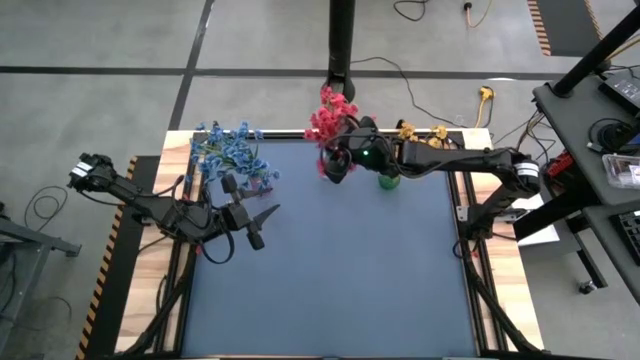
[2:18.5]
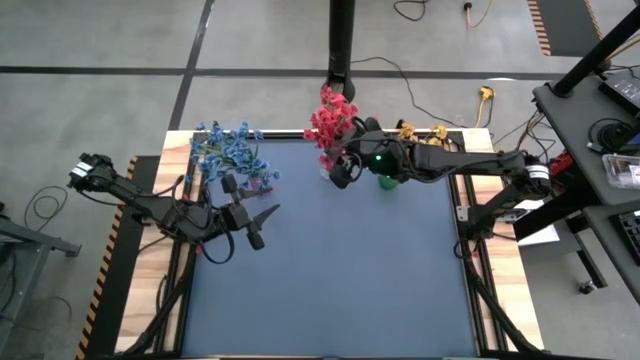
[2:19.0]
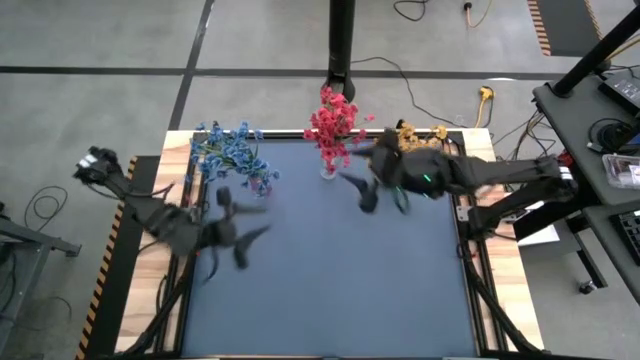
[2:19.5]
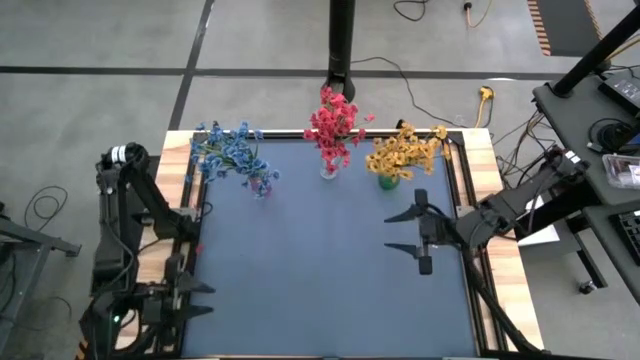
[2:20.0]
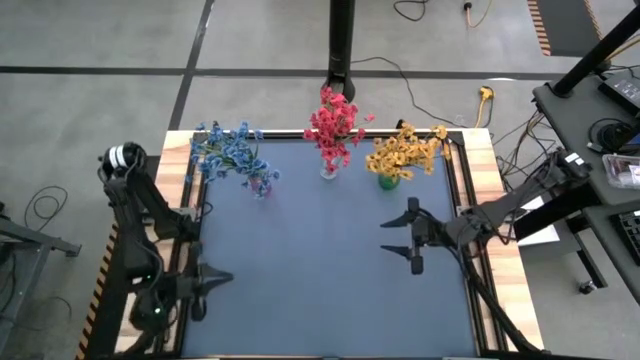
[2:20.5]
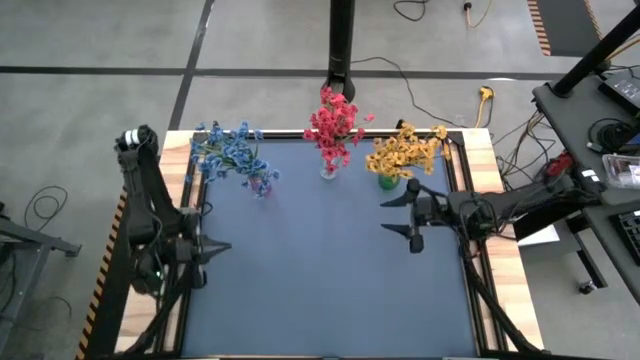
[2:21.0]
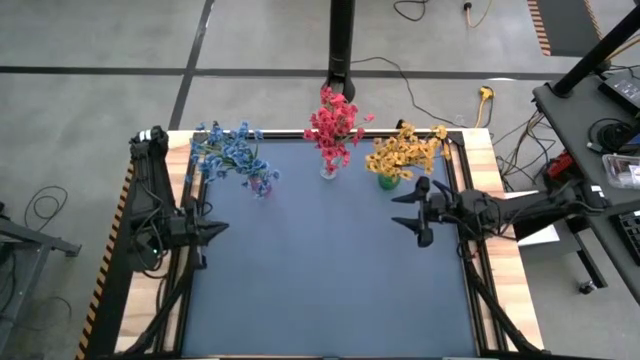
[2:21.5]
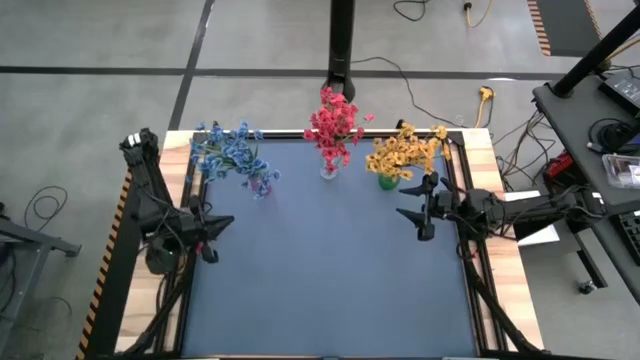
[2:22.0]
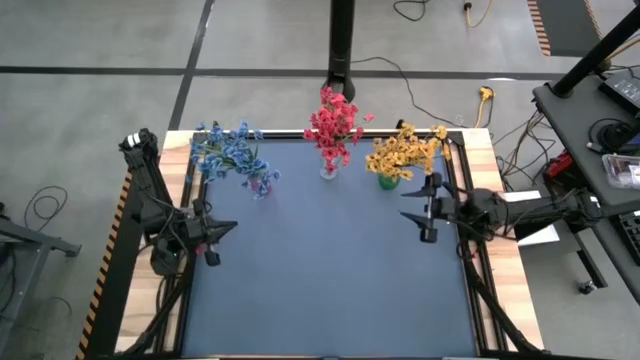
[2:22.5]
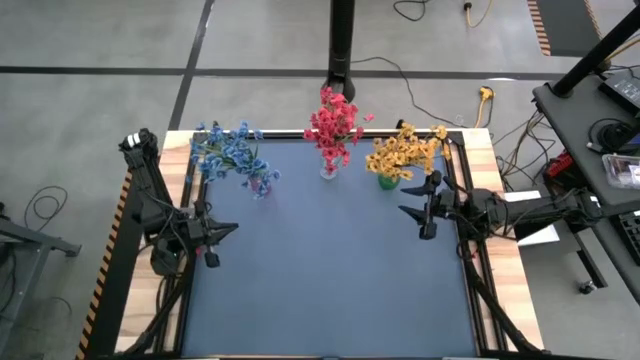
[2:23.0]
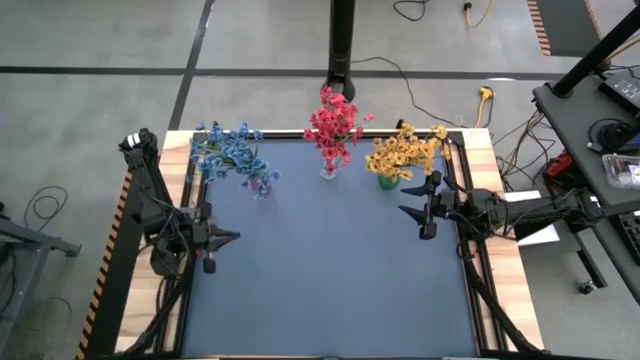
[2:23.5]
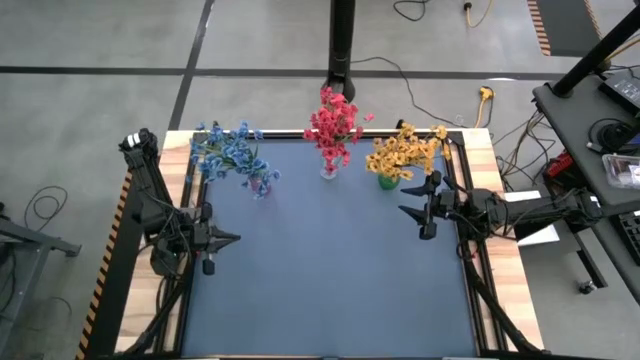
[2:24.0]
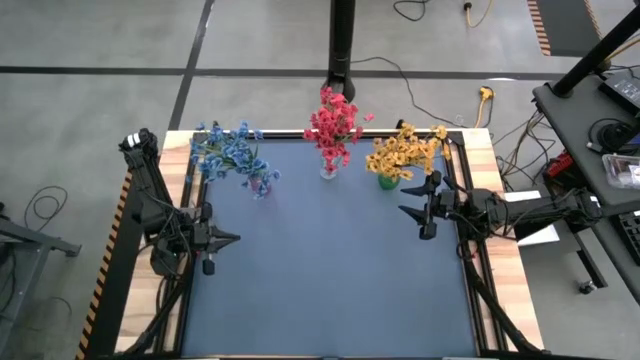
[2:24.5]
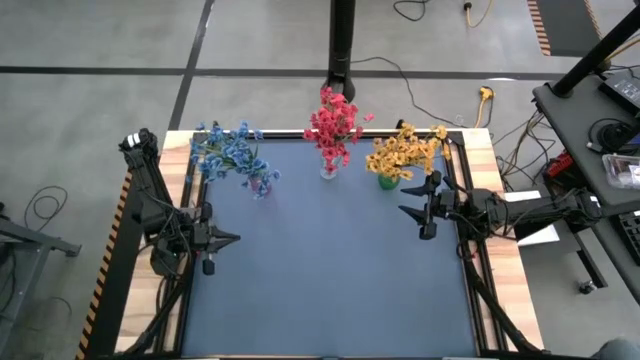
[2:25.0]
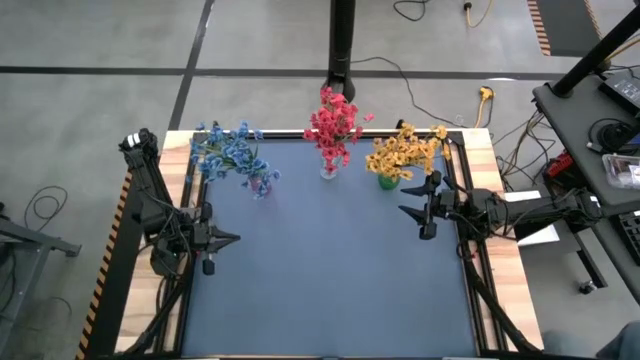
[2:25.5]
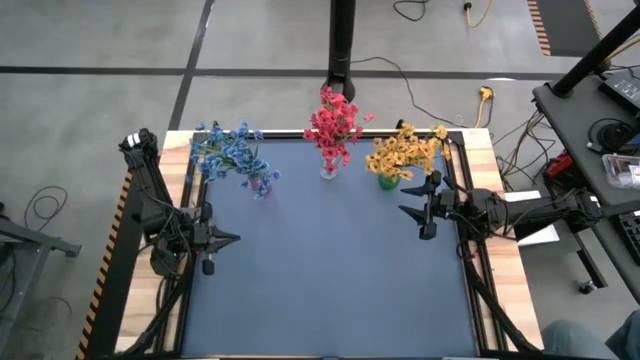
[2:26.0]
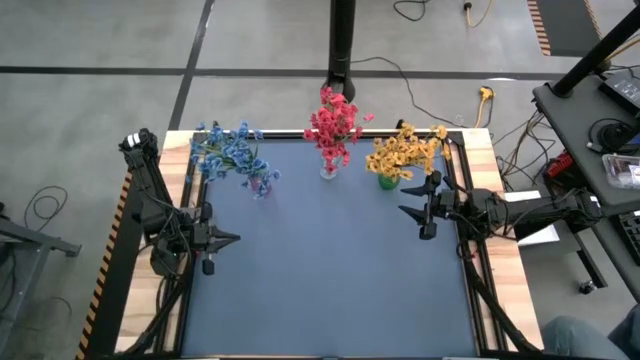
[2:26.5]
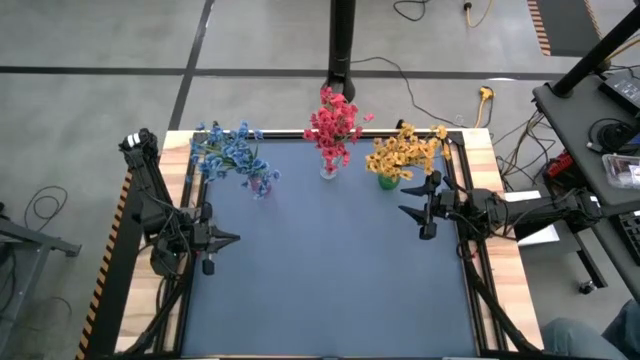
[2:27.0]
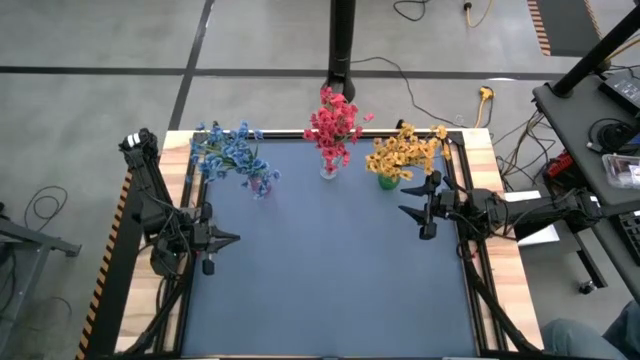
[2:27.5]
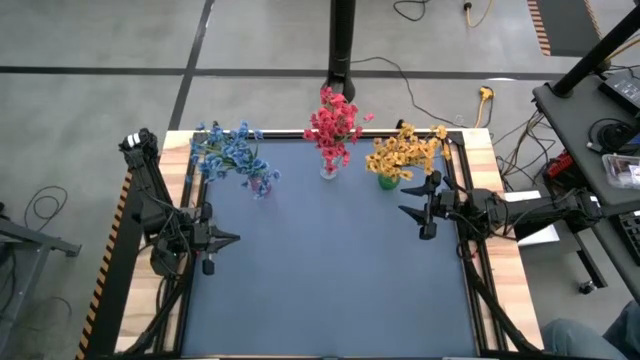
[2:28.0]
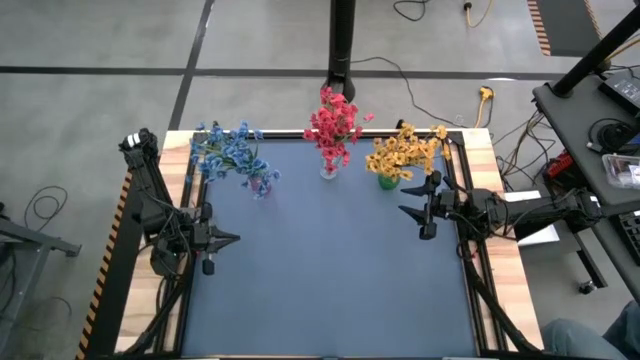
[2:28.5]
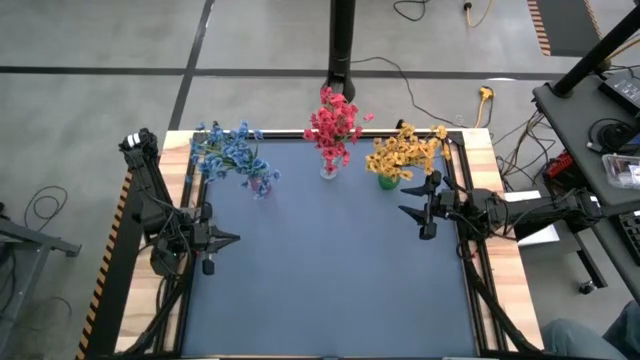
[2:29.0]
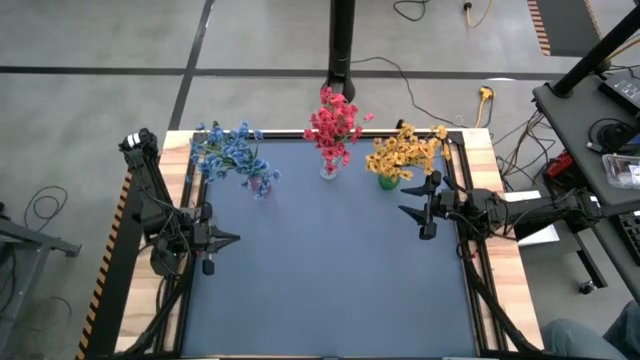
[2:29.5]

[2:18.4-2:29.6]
Task: Sort flowers into vase by color
Return to Home Position

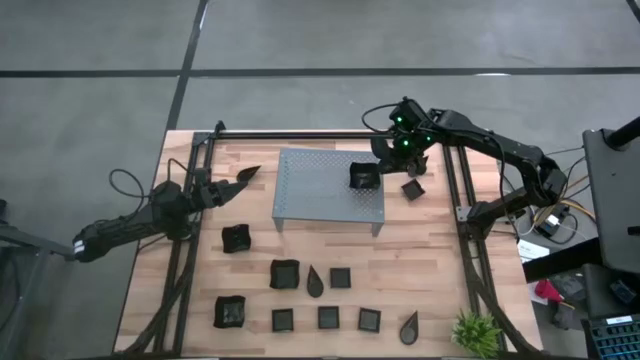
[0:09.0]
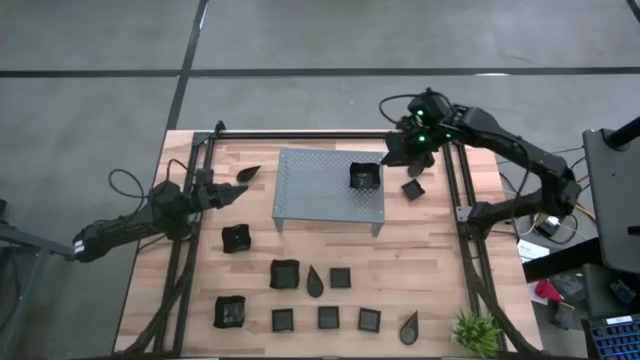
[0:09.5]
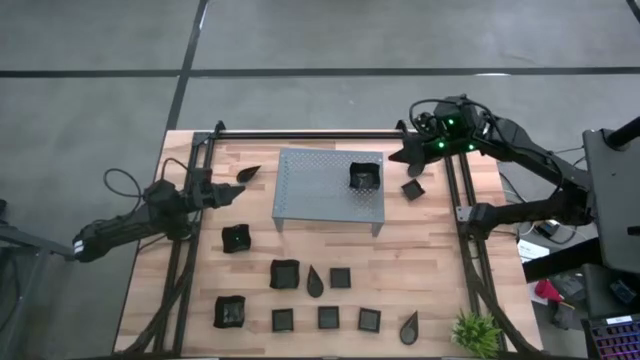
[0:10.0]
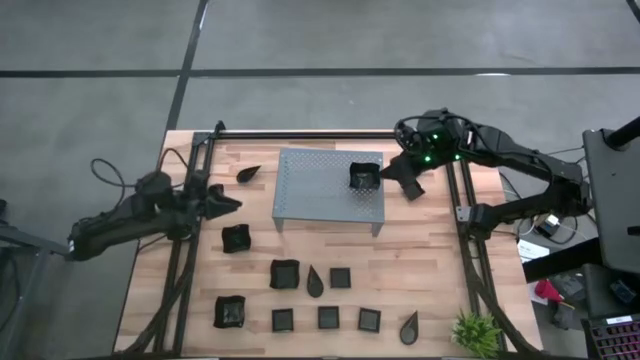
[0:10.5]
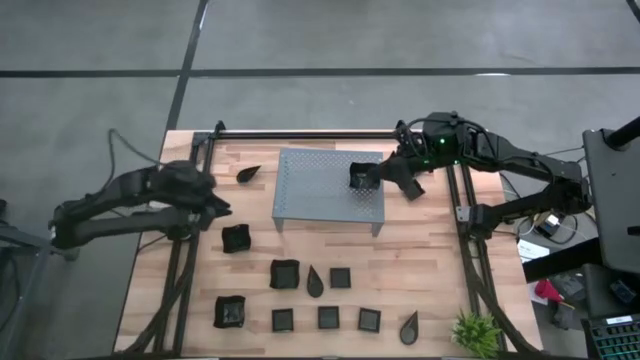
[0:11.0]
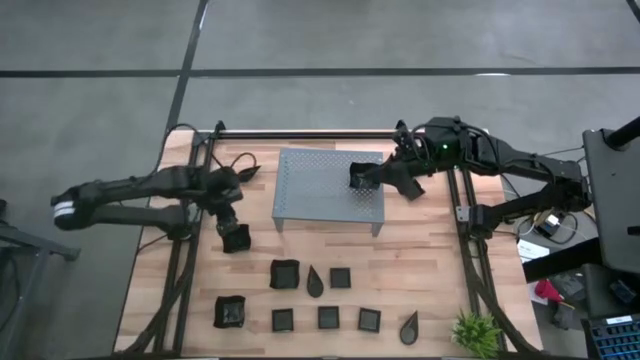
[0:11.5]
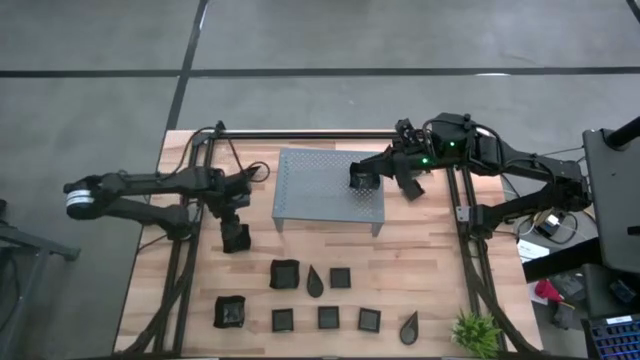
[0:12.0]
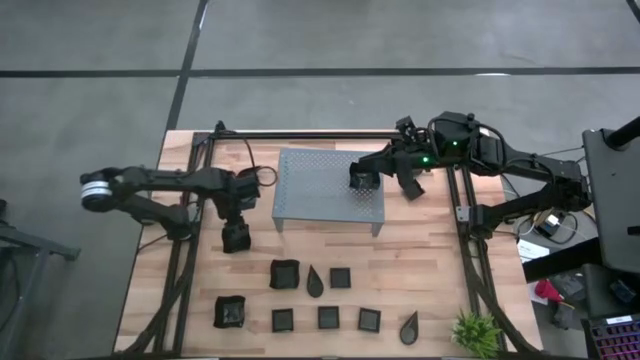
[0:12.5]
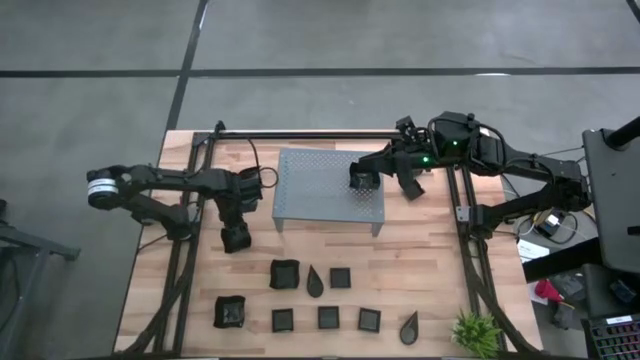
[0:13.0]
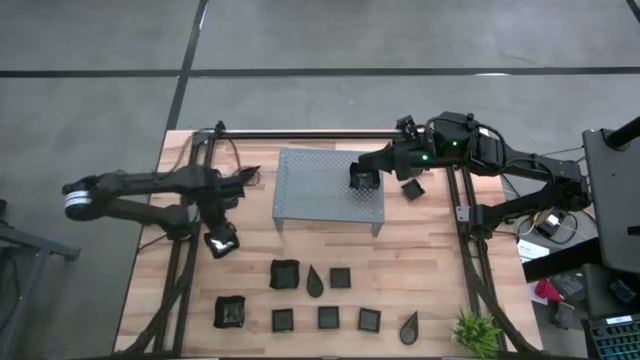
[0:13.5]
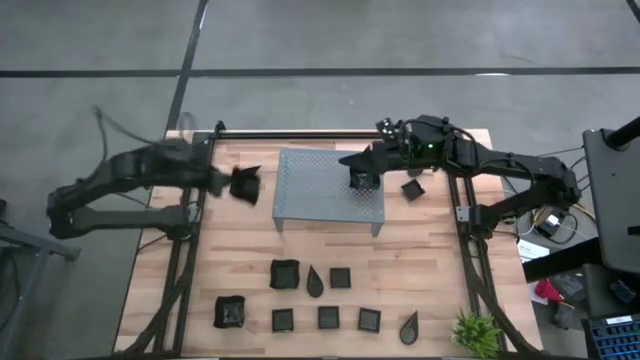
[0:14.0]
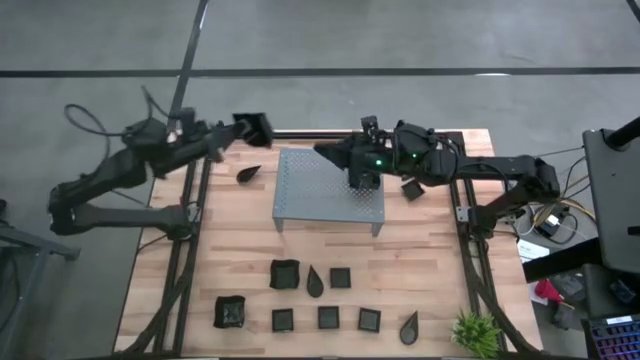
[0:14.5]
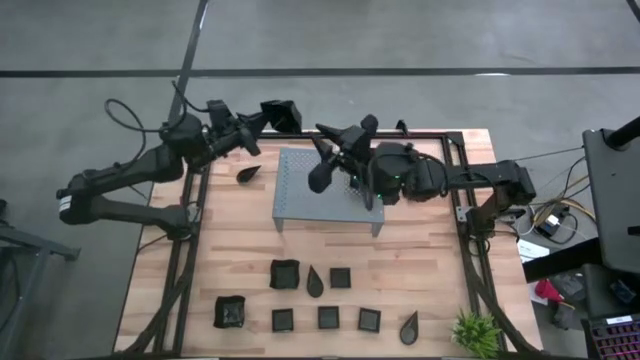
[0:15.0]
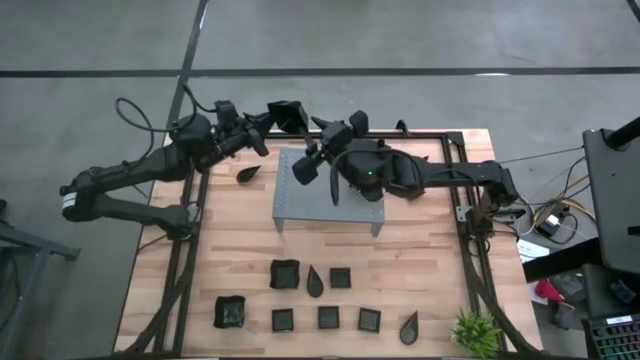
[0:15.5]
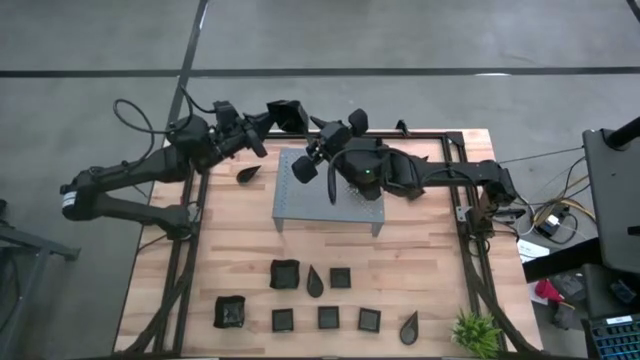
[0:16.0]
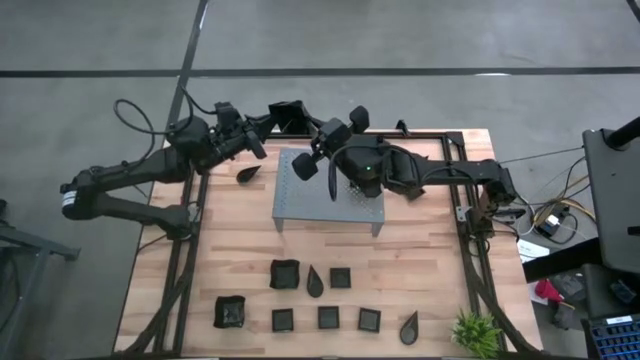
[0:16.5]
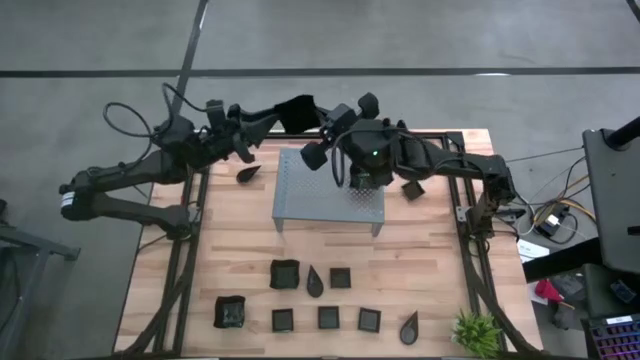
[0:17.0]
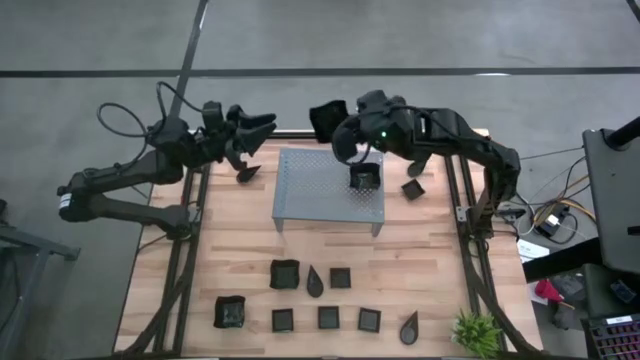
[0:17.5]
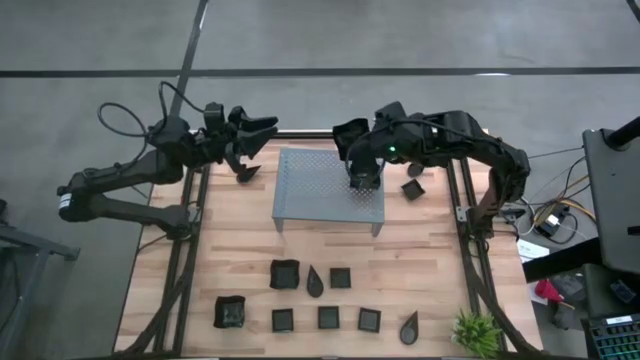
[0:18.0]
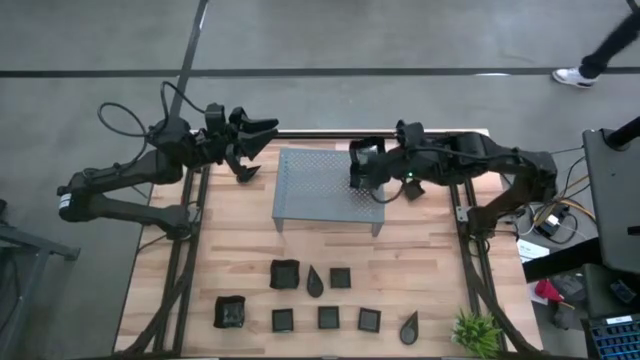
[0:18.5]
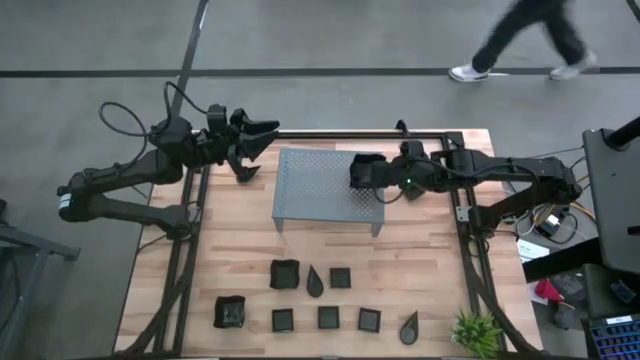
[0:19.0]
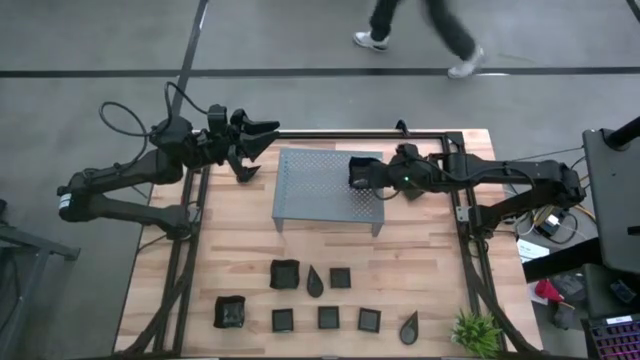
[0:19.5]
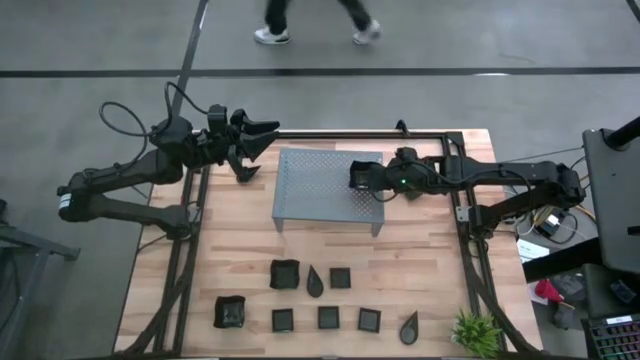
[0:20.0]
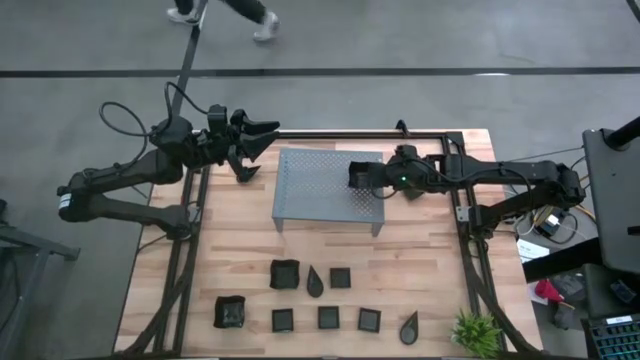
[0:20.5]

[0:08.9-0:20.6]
Task: Pick & Place Mini shaped plates
Stack the black distorted square plate on top of the other black distorted square plate on the shelf
